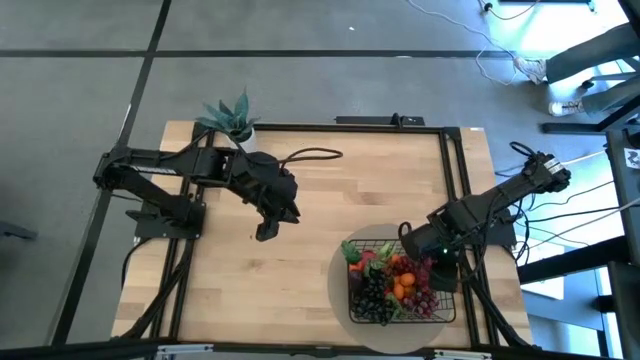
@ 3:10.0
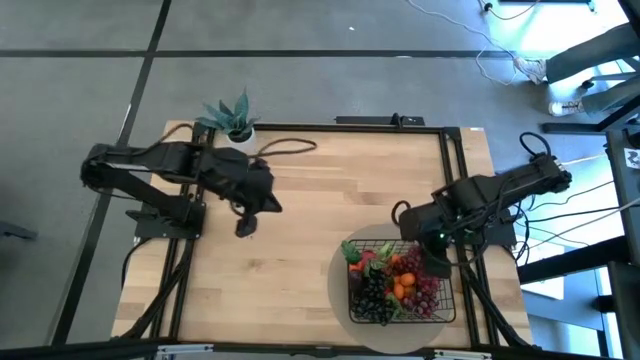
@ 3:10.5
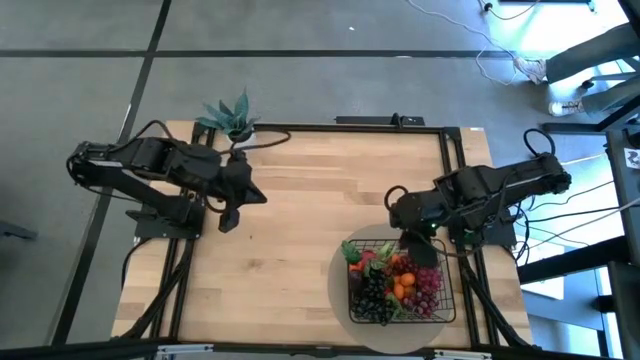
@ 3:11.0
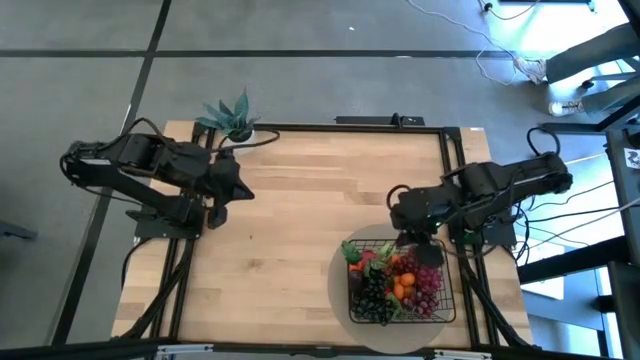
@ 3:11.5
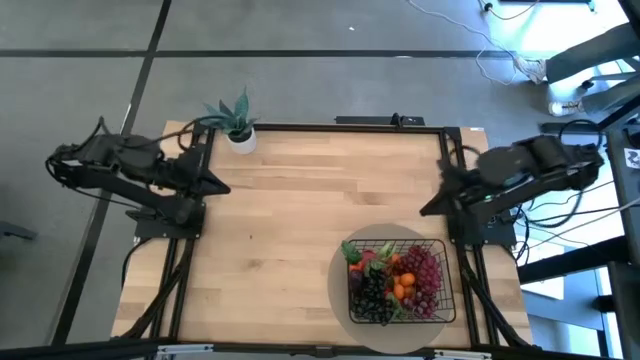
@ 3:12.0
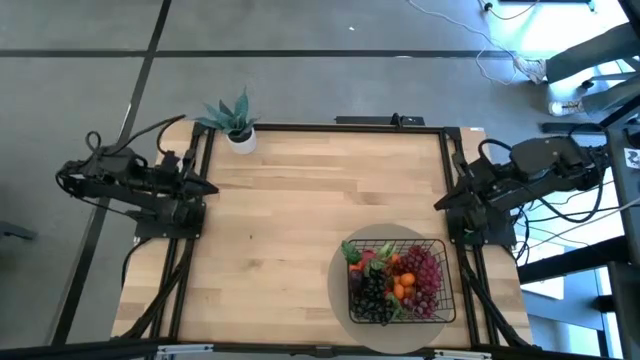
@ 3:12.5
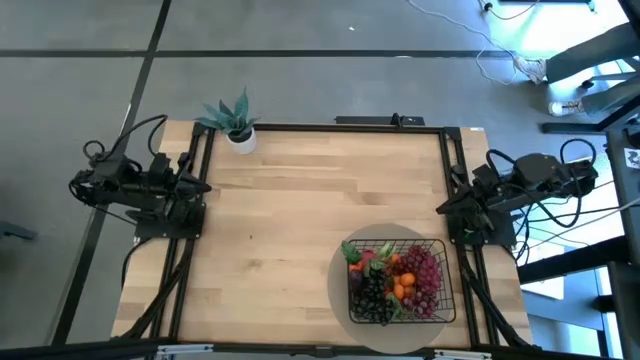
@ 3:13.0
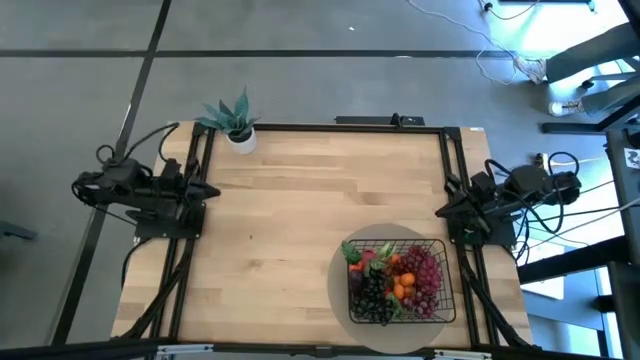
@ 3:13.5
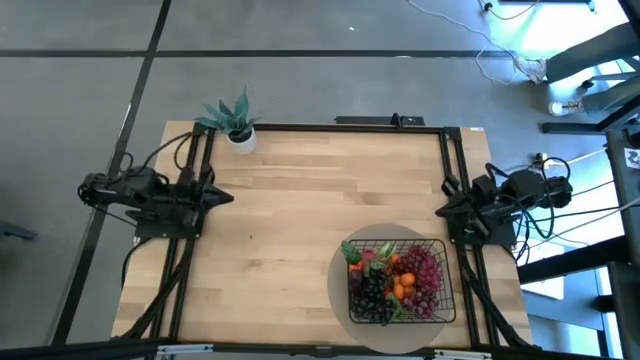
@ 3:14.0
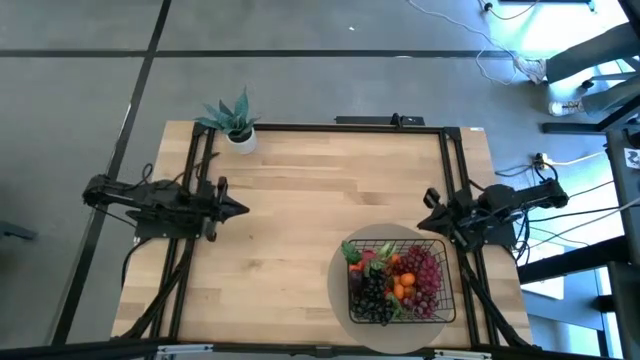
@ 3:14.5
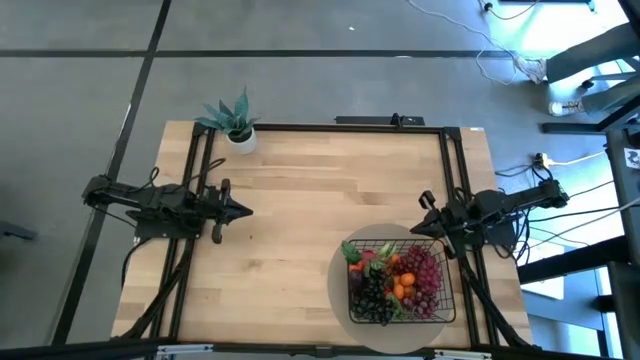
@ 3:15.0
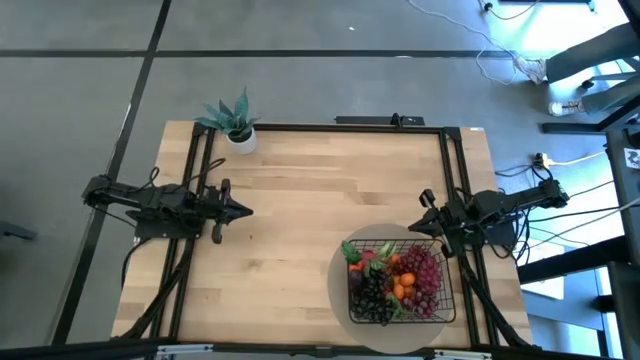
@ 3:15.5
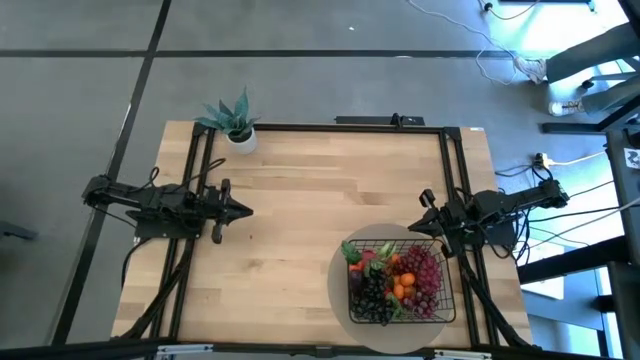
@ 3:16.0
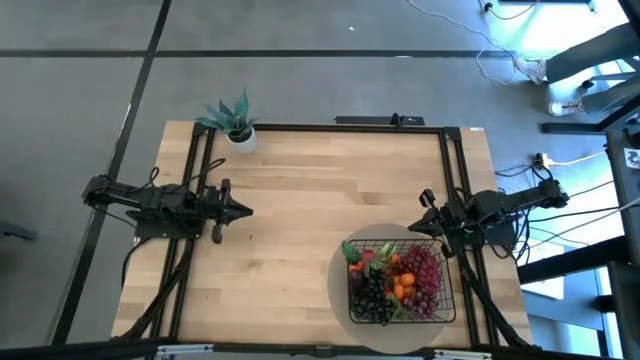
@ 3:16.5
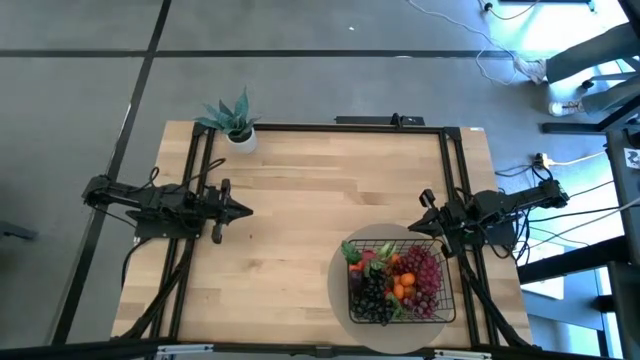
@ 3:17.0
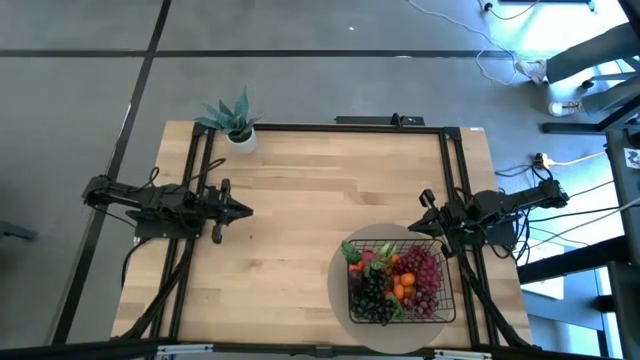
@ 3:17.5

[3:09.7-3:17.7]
Task: Build produce basket
Return to Home Position

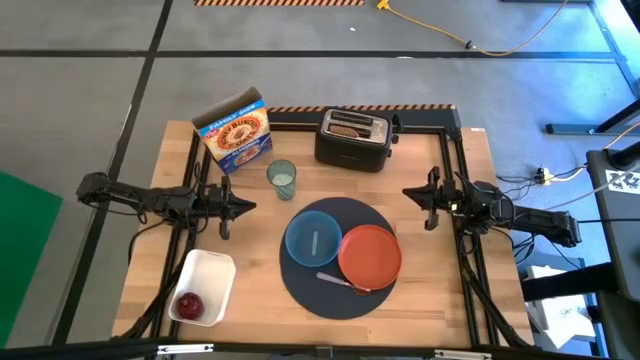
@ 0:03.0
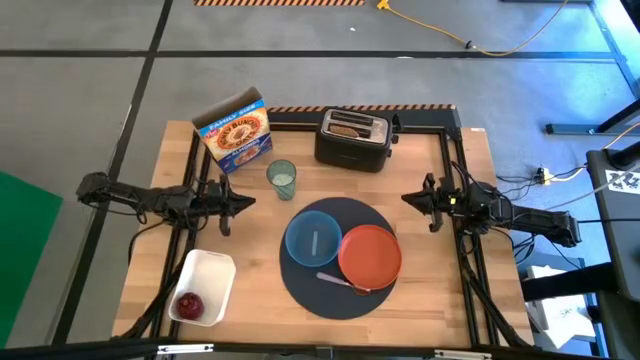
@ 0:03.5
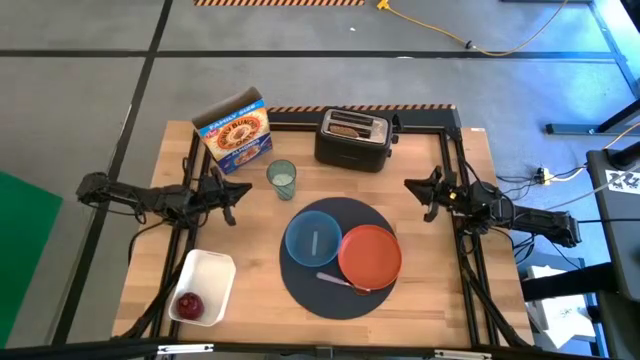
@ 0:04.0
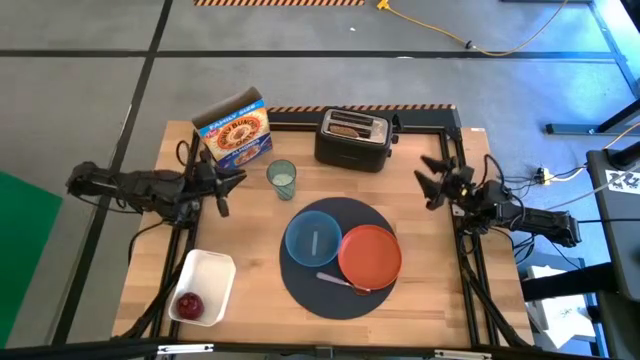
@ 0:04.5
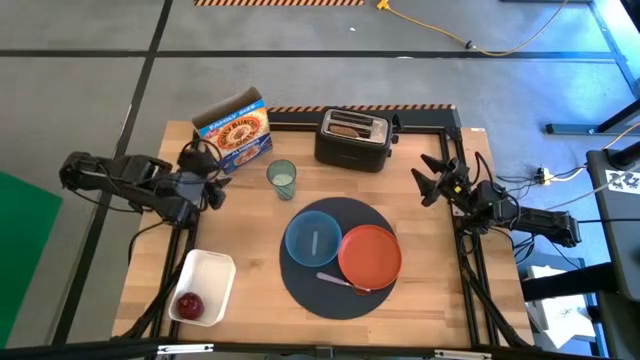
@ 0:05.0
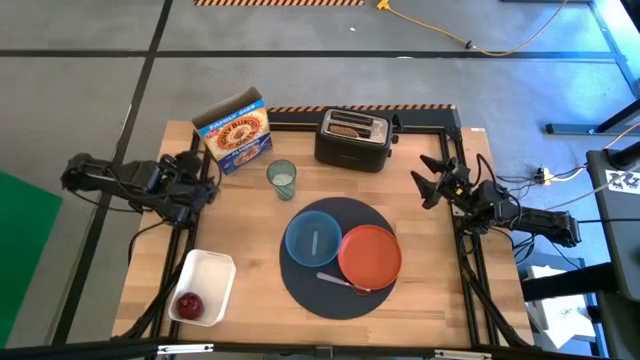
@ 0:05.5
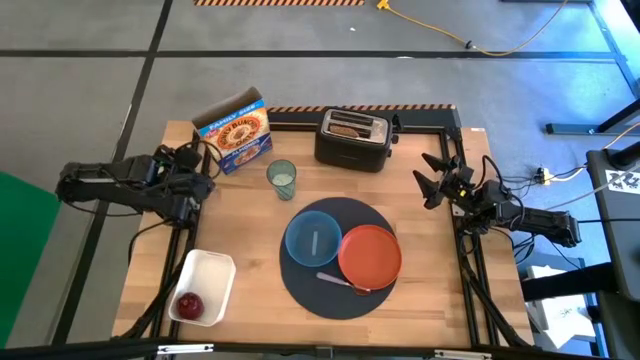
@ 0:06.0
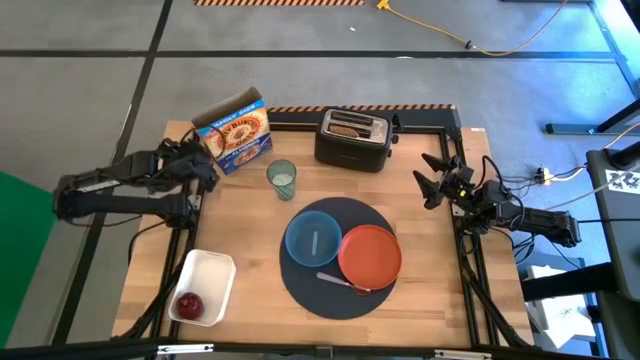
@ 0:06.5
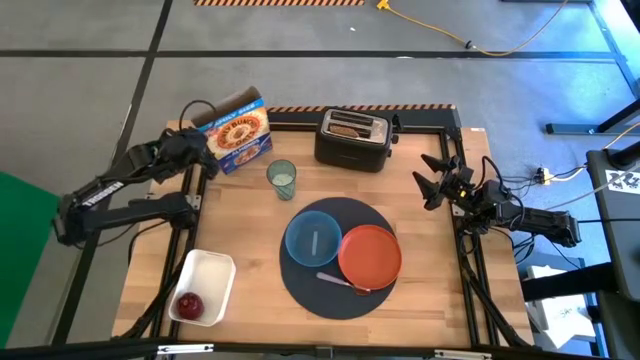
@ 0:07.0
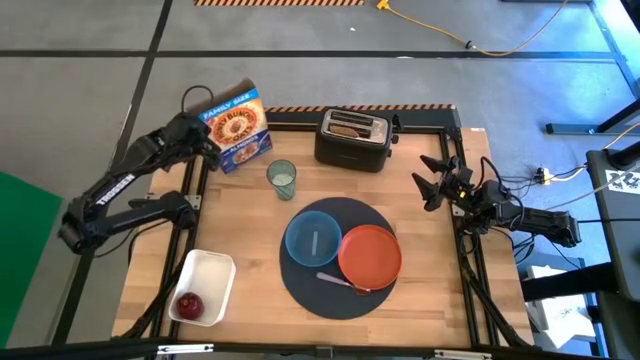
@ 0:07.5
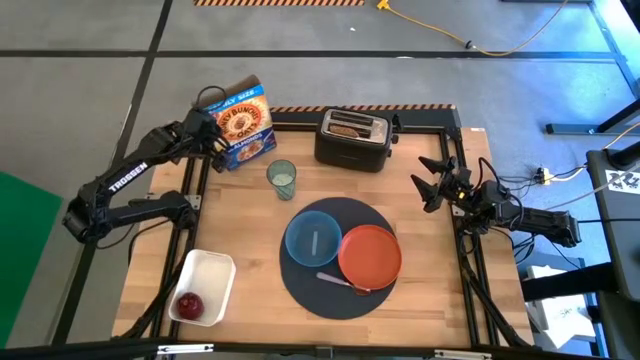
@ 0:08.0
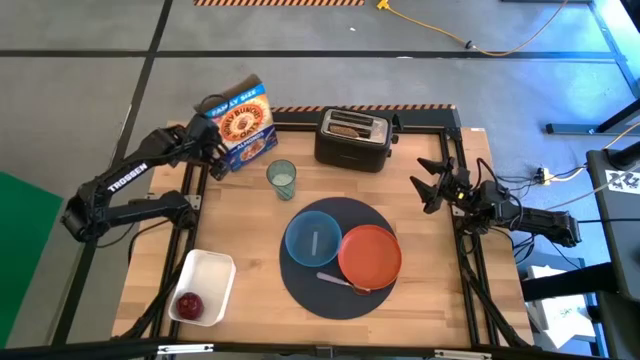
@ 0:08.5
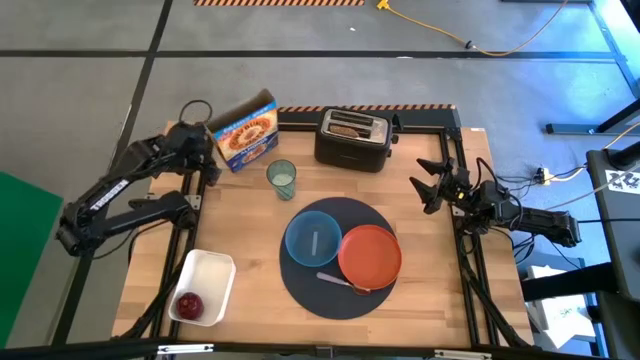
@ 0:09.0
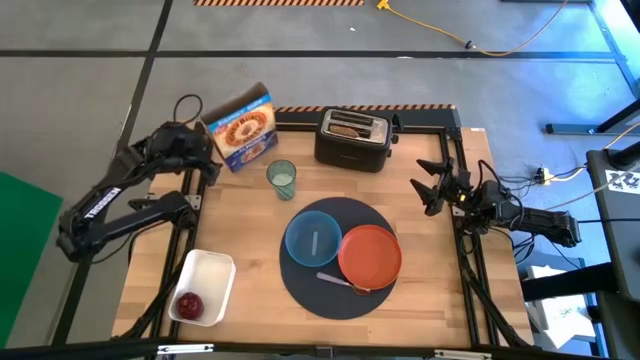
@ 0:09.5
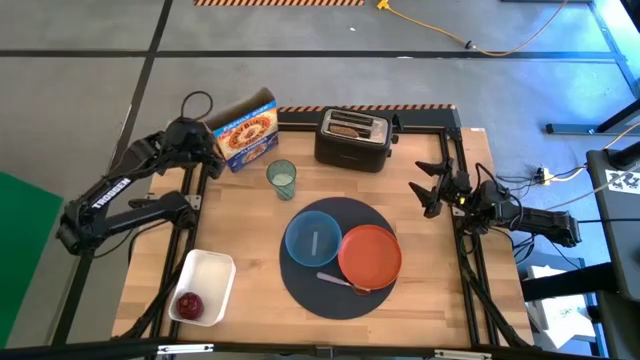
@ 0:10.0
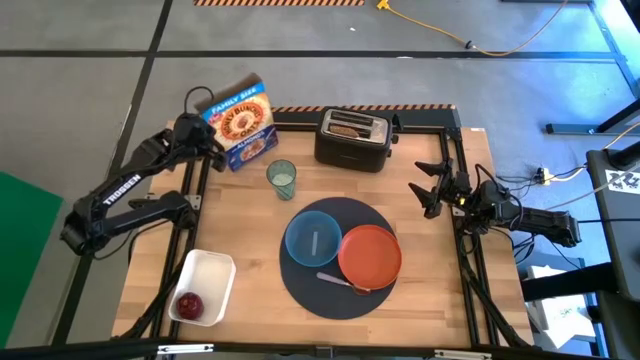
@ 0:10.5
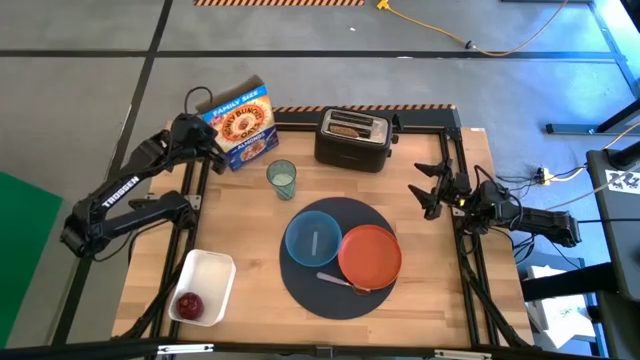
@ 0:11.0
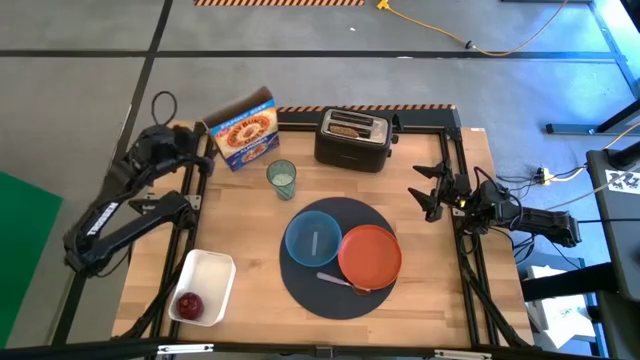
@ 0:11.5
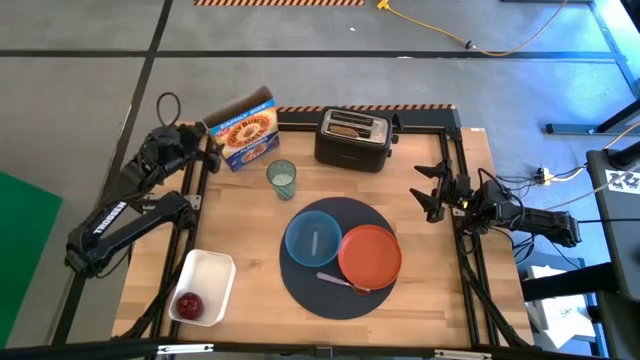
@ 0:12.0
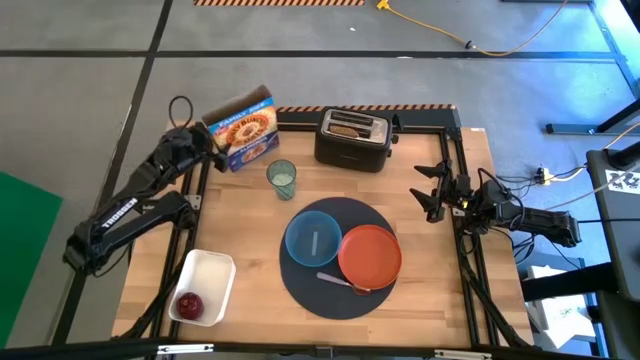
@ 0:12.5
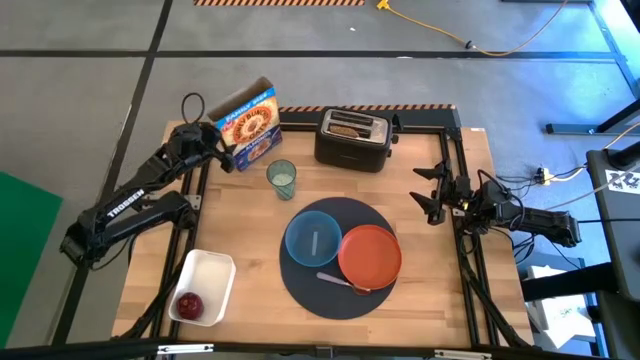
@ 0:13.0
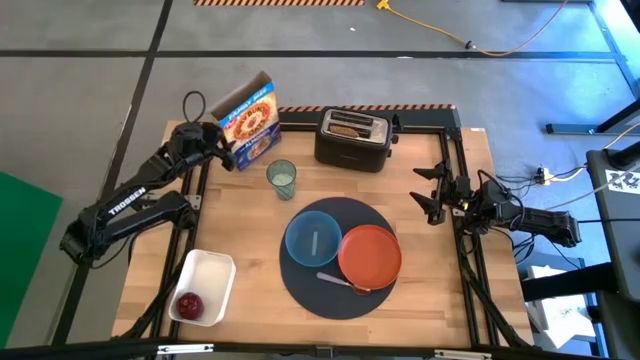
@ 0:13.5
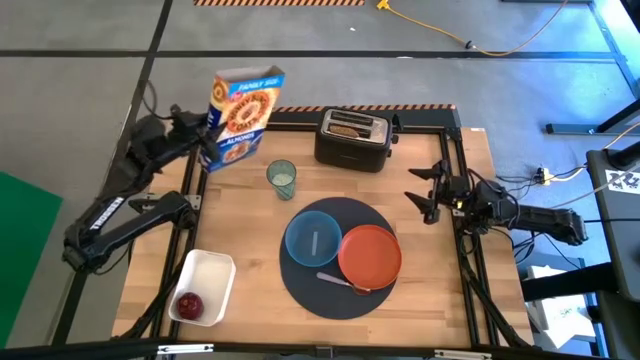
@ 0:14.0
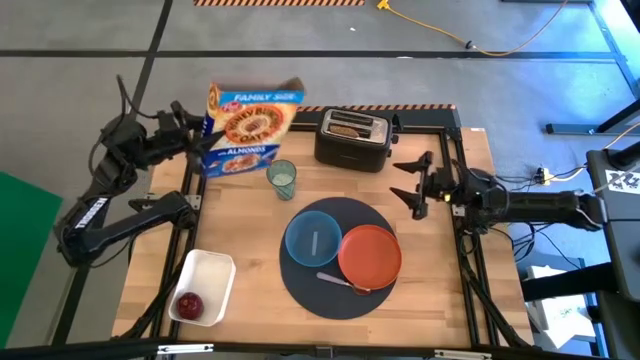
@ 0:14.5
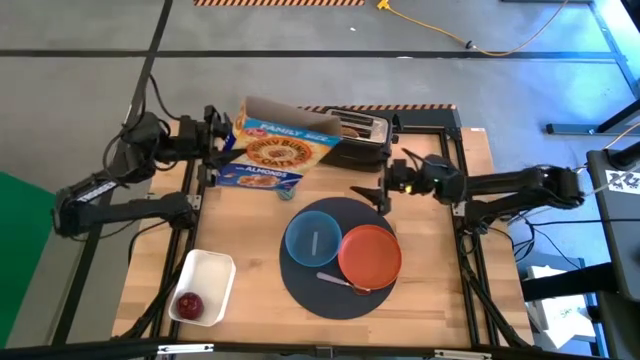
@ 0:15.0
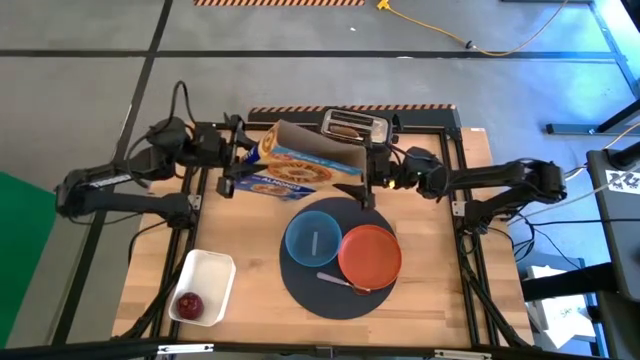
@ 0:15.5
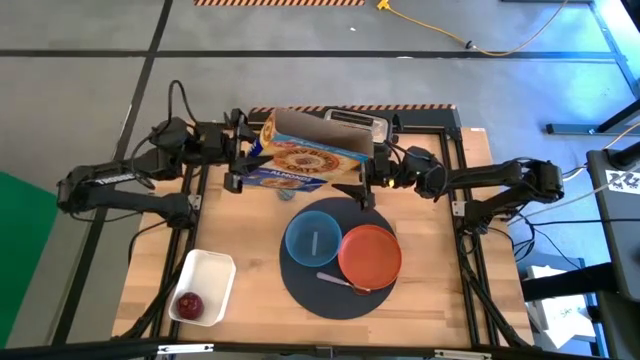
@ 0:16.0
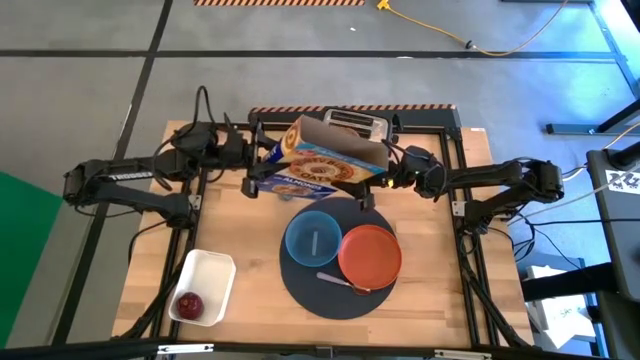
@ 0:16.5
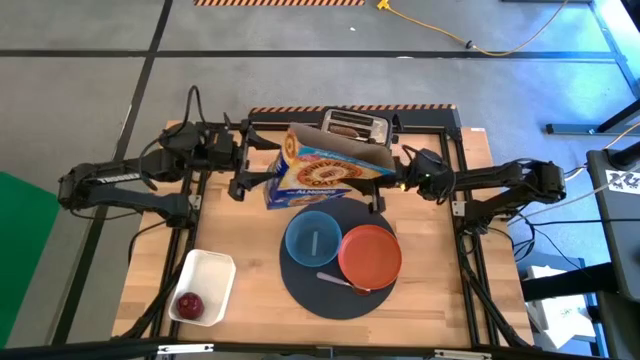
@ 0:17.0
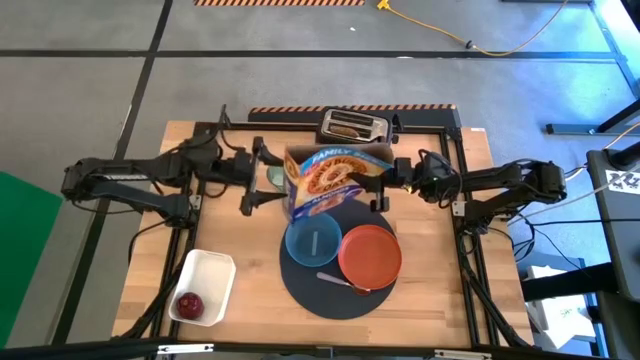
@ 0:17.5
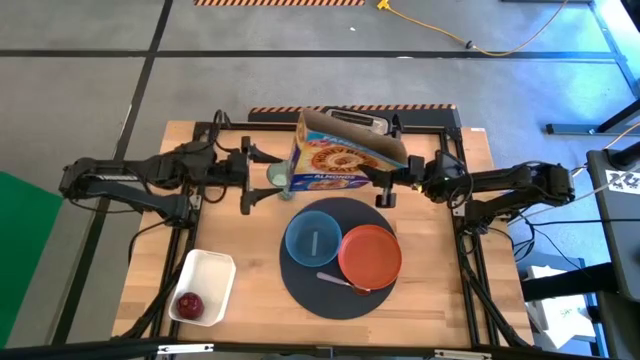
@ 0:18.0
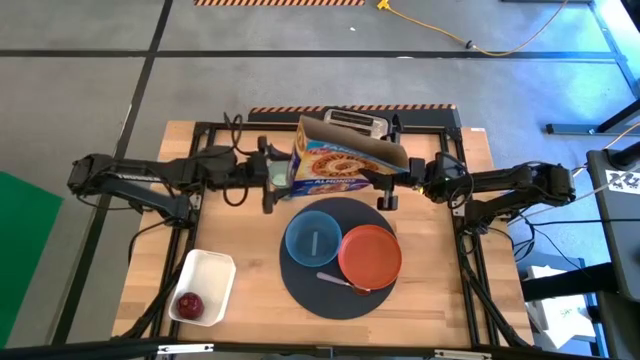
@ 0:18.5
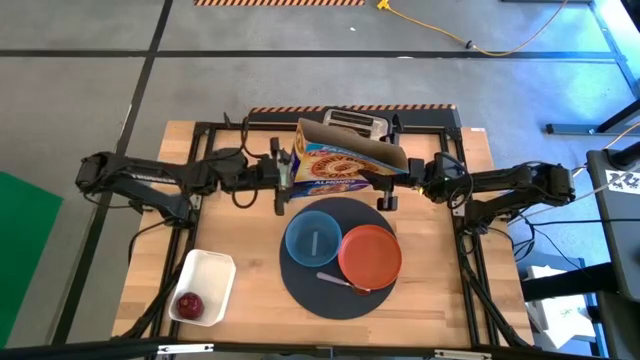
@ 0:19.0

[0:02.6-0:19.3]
Task: Arrange a breakfast setting
Pour the cereal from the cereal box into the blue bowl
